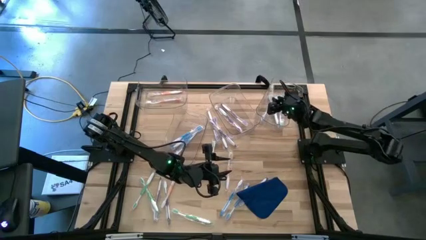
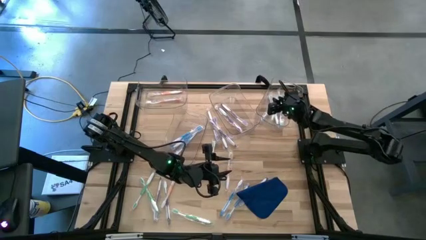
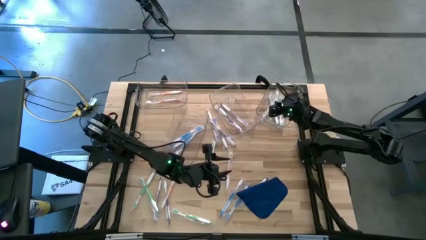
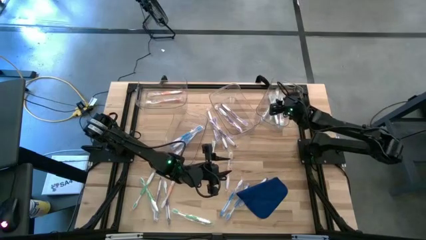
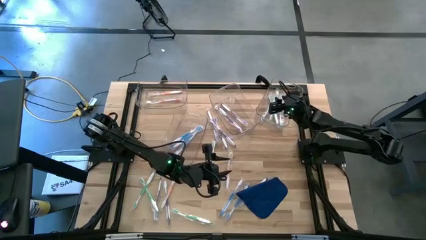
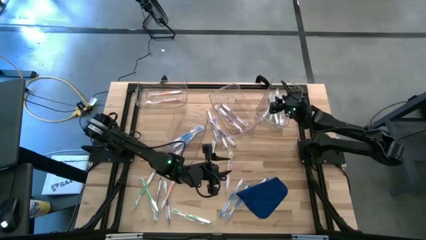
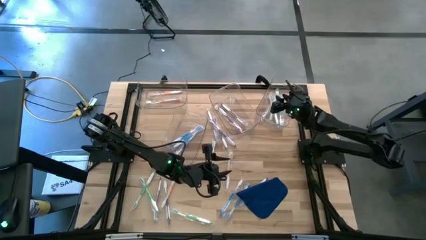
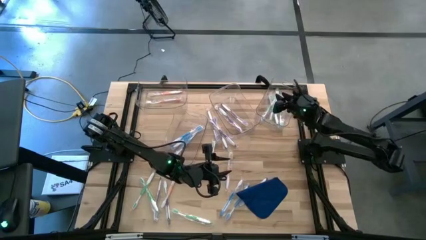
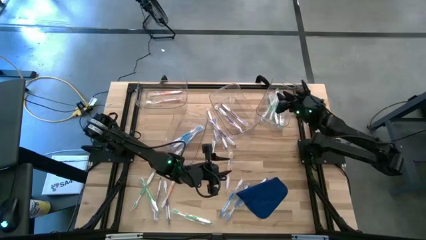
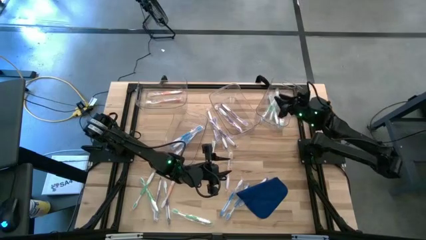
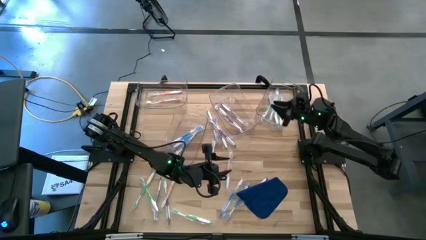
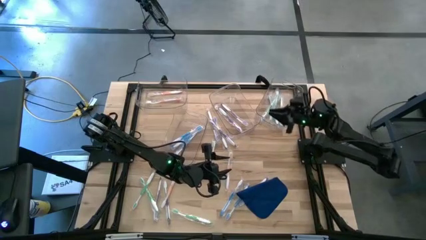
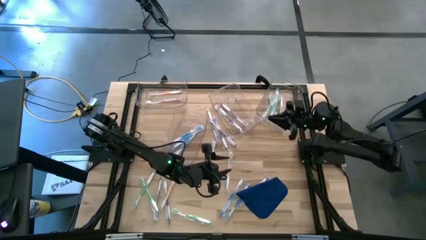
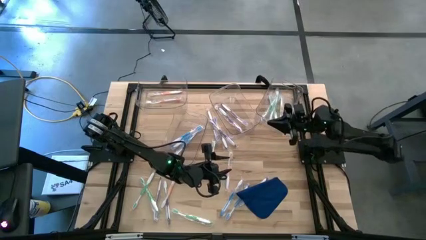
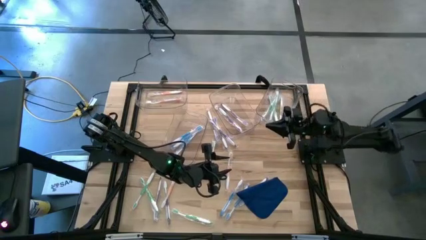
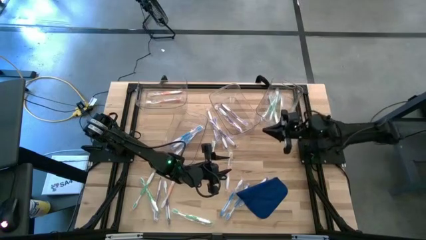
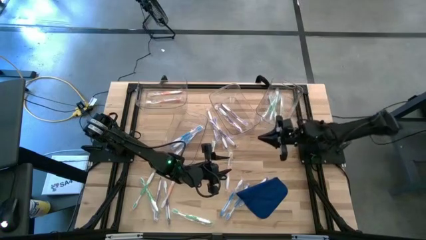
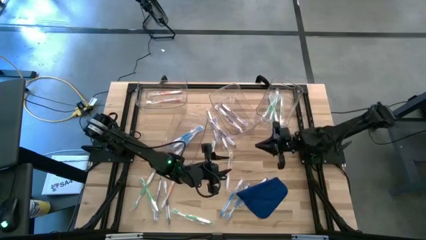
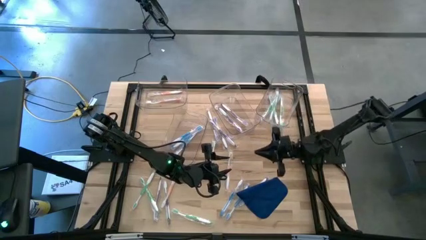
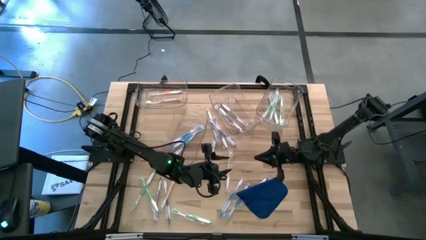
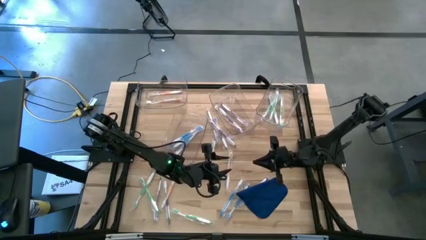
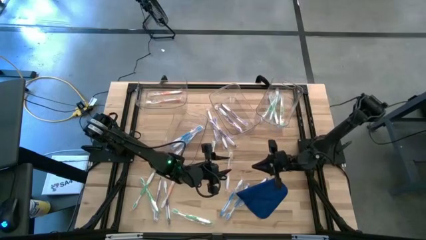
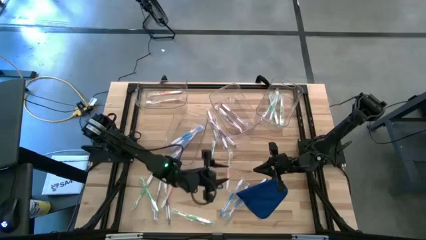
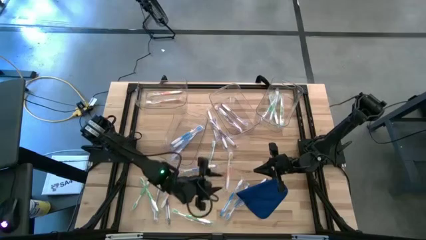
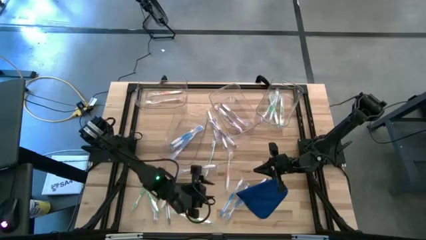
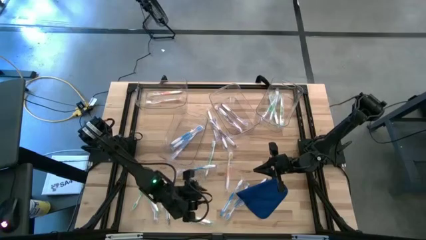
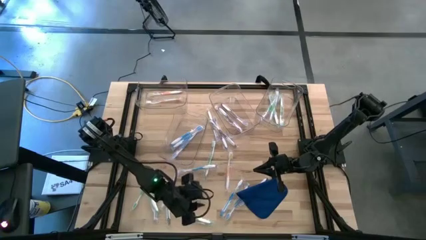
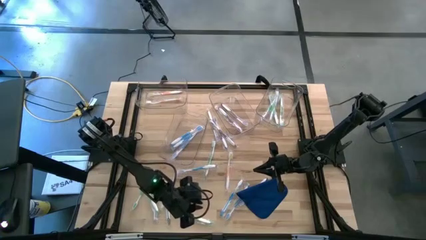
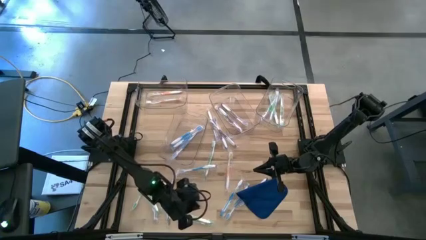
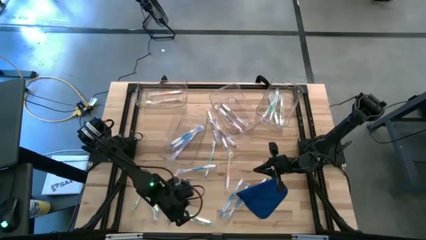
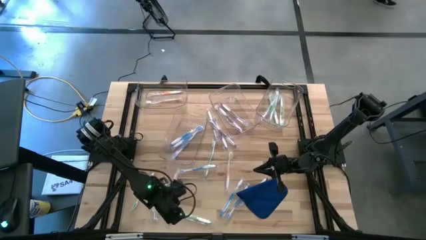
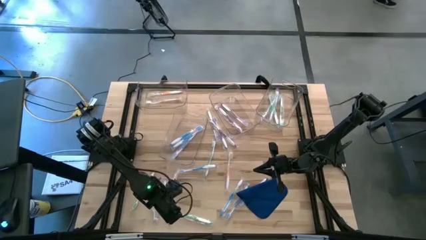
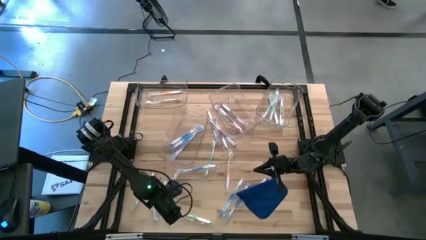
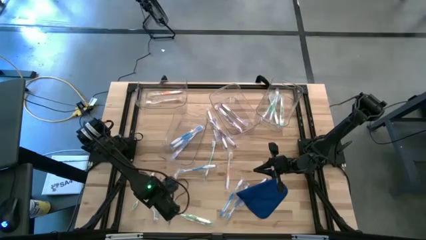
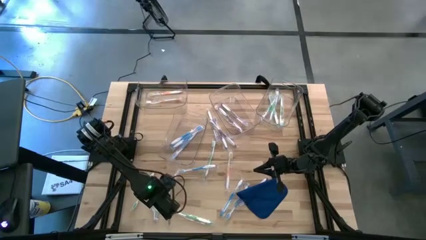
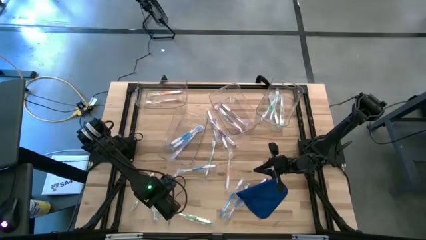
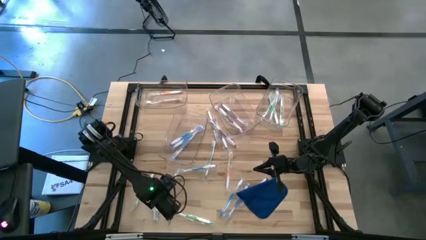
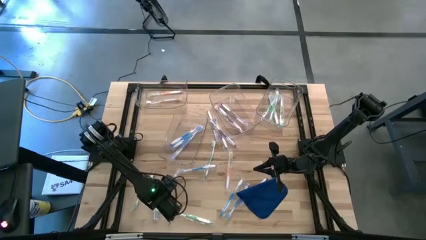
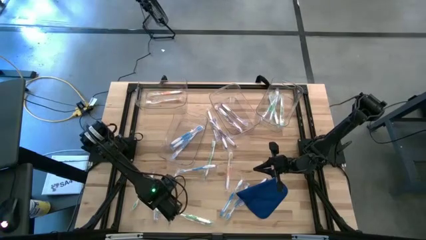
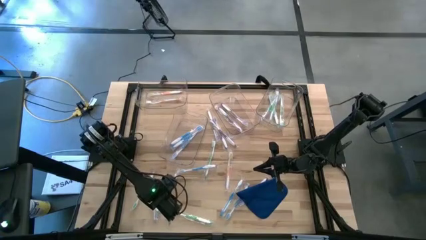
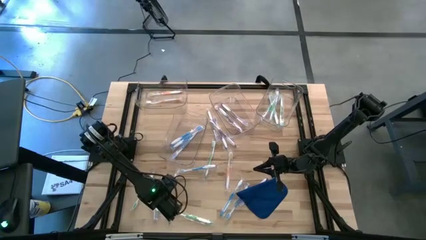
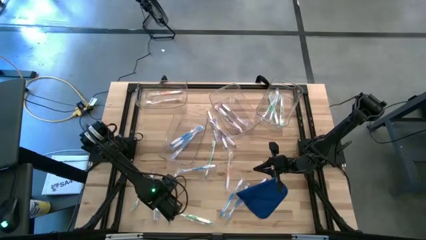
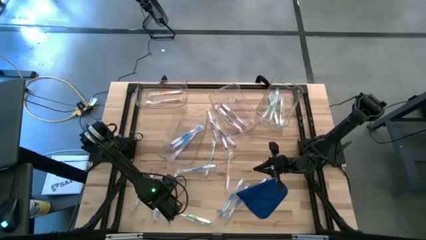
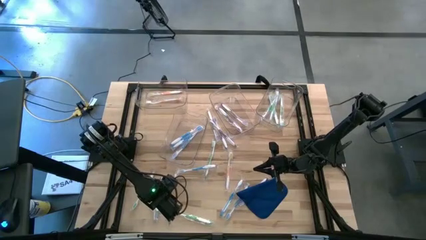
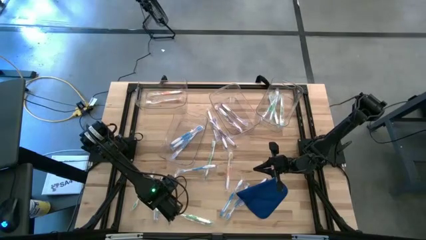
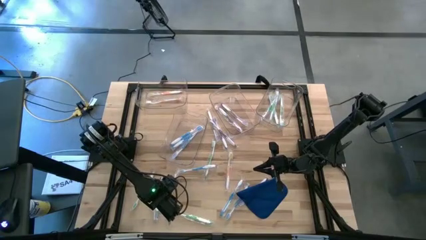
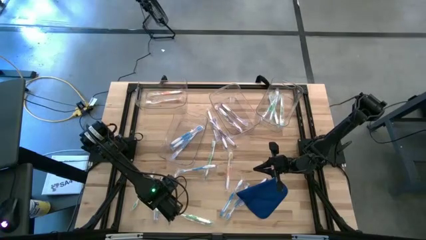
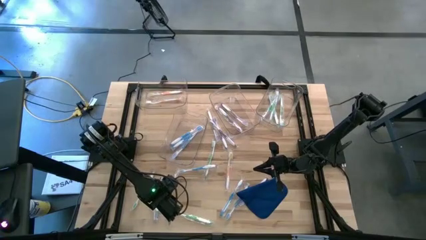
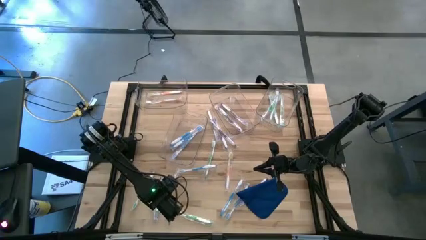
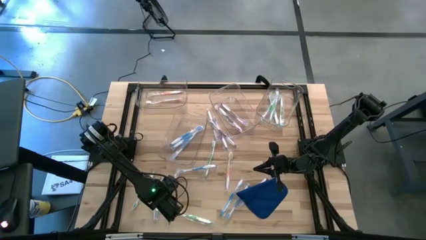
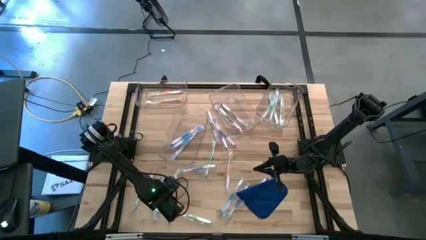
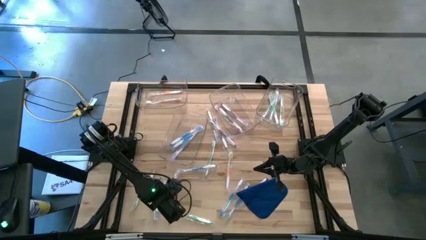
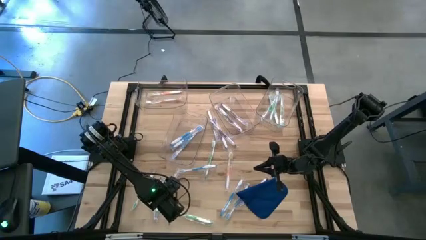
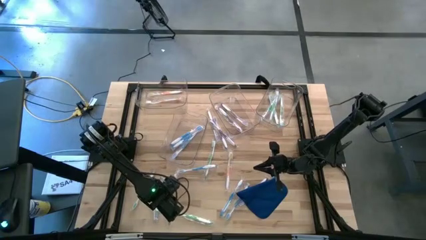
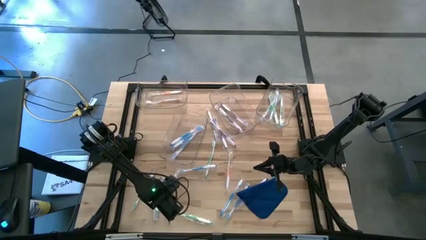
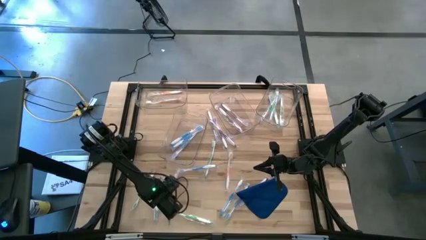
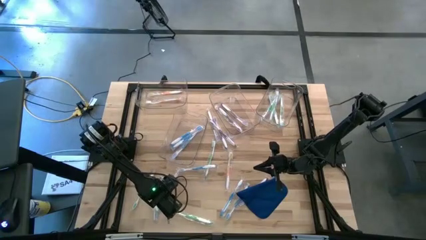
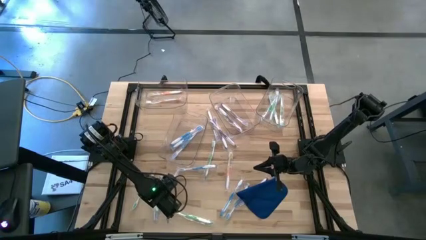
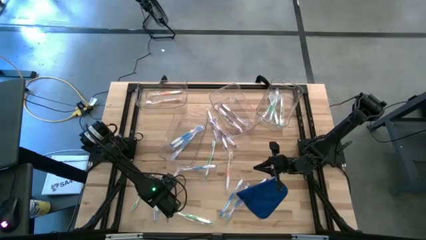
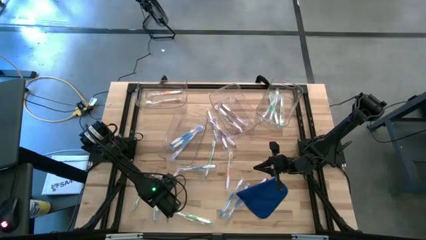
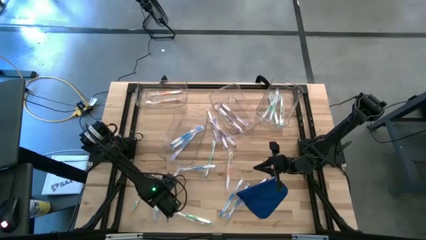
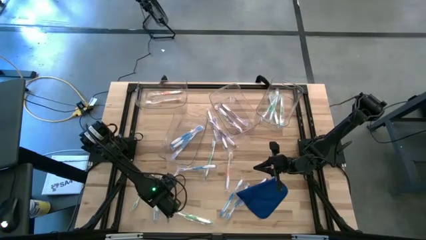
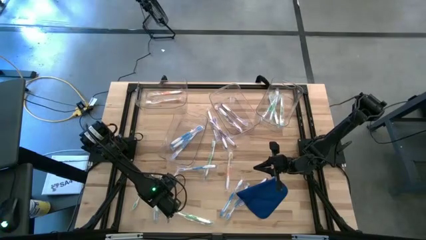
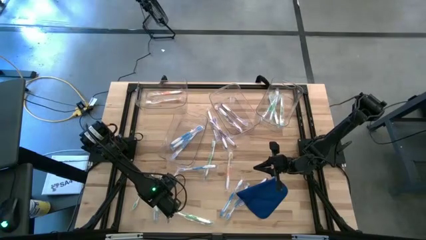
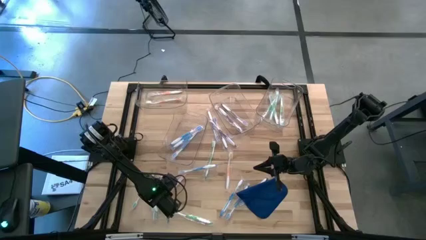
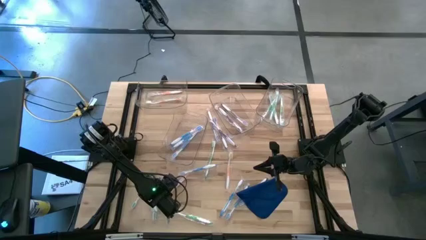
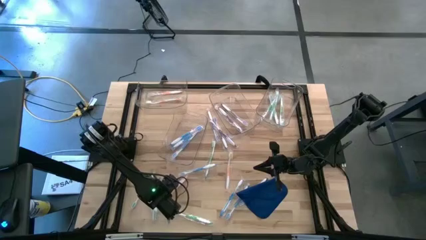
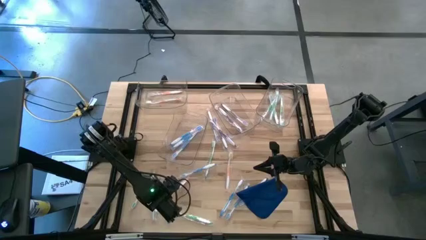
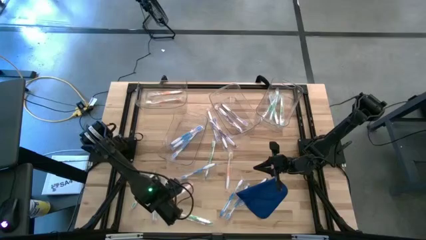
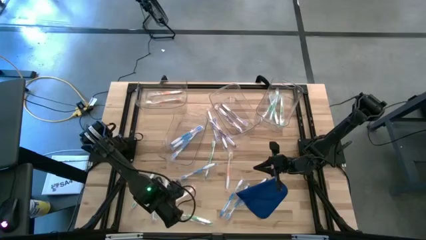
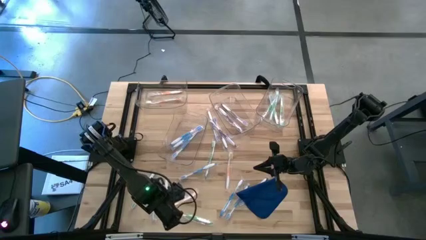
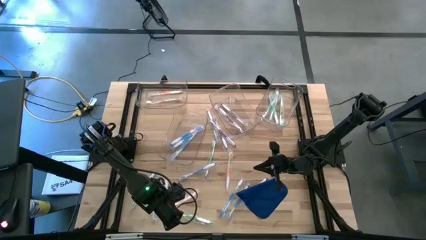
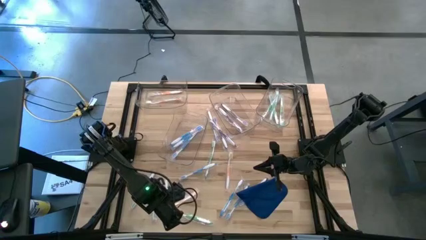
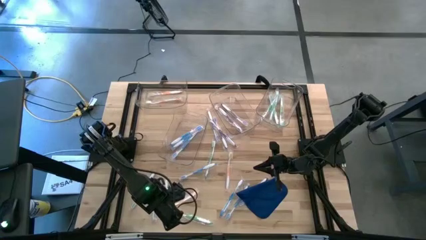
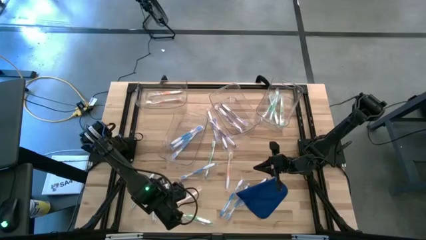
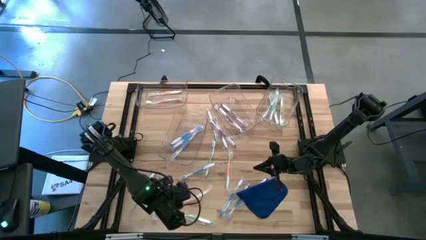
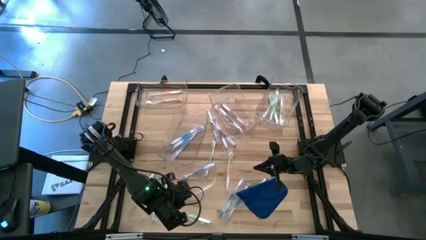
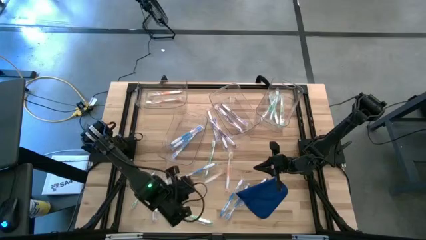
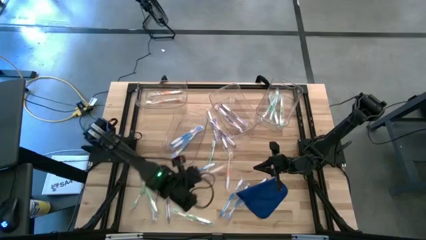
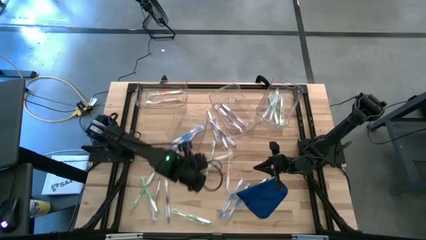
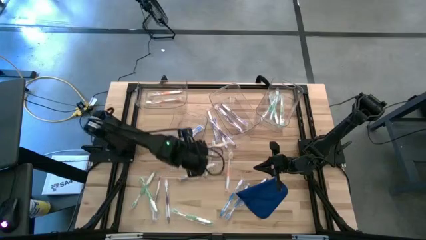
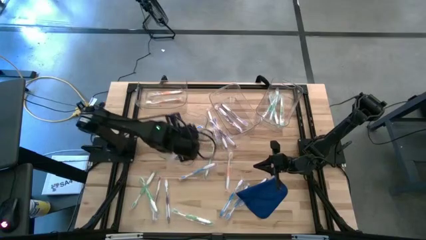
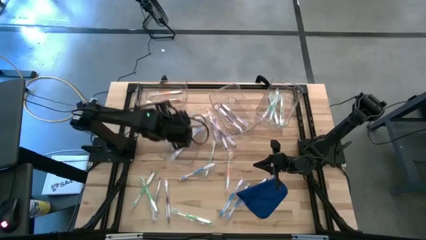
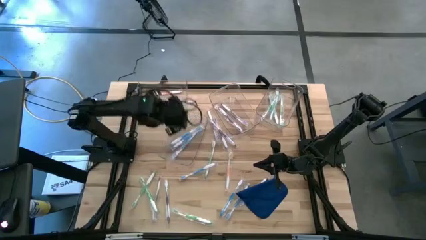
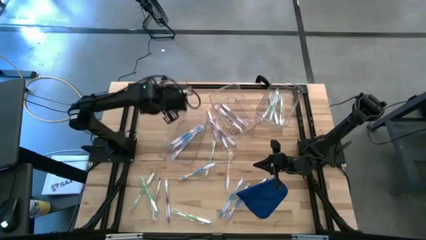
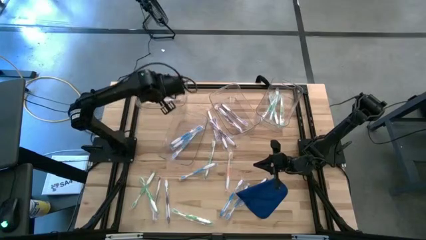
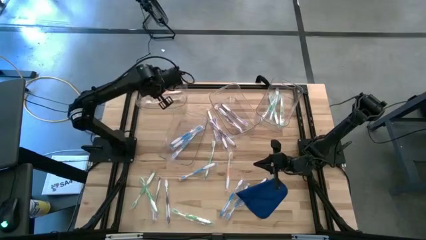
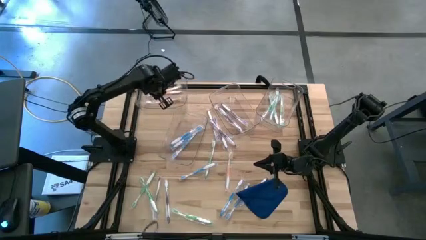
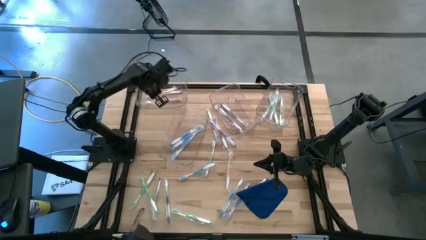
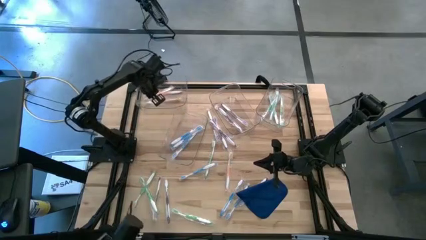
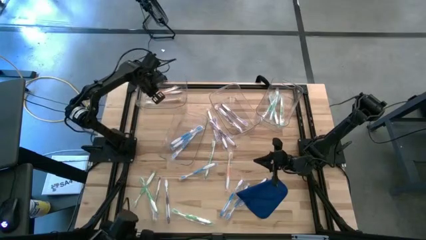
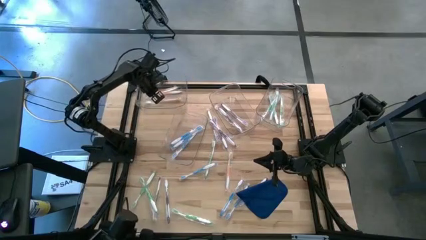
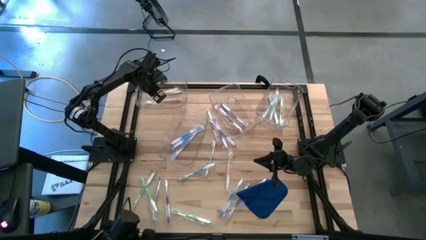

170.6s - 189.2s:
Task: Pick & Place Toothbrushes
Put the orange toothbrush into the top left transparent bin
